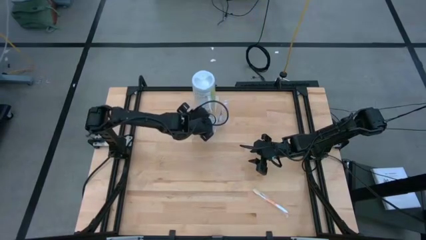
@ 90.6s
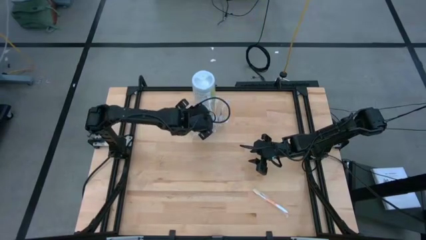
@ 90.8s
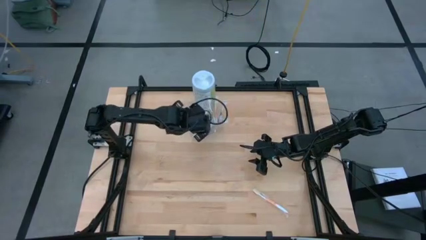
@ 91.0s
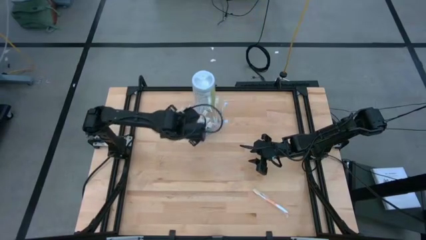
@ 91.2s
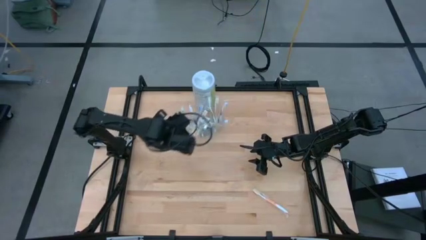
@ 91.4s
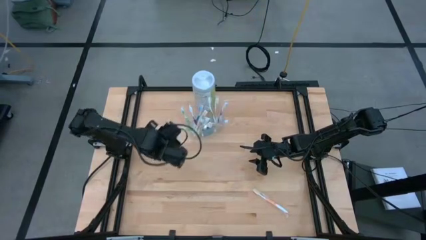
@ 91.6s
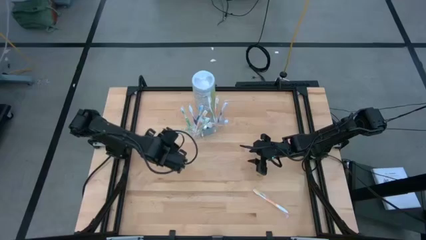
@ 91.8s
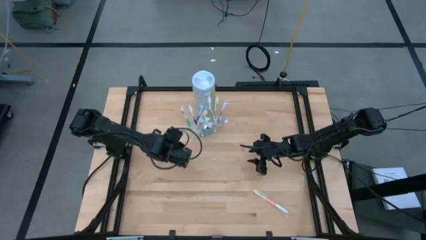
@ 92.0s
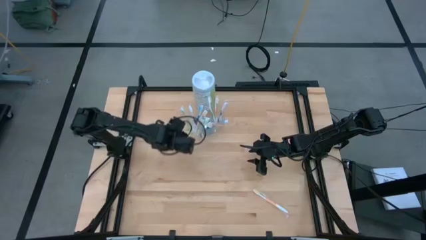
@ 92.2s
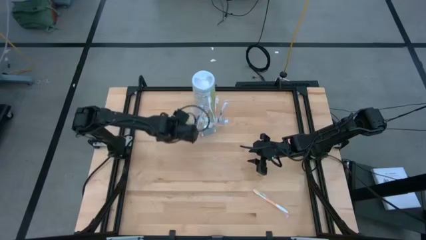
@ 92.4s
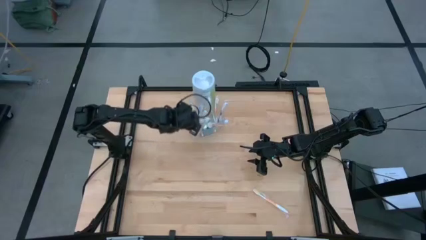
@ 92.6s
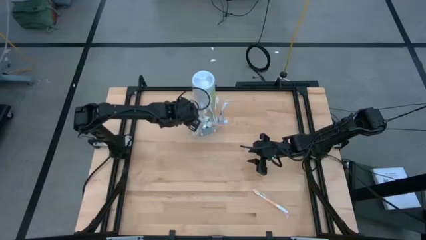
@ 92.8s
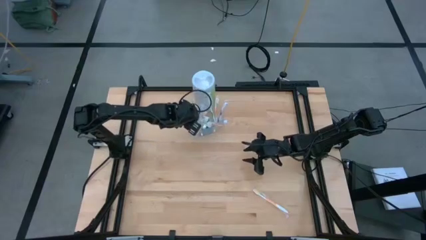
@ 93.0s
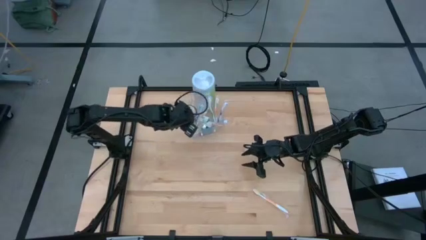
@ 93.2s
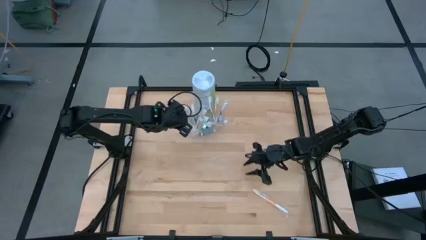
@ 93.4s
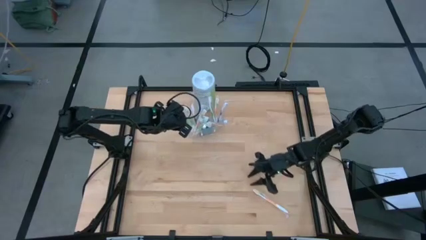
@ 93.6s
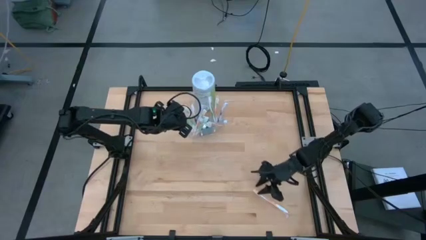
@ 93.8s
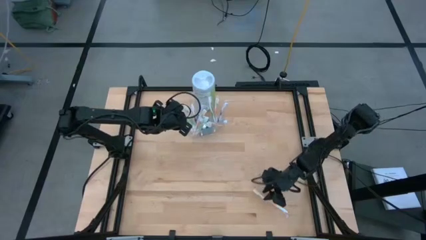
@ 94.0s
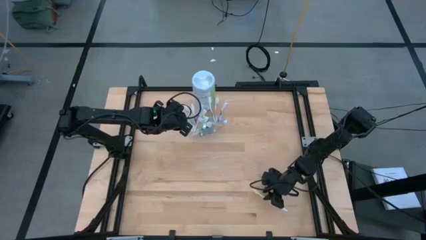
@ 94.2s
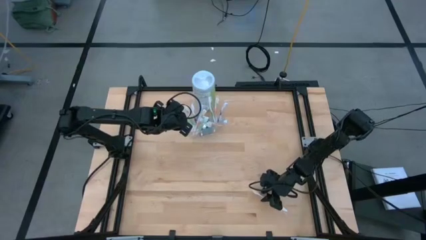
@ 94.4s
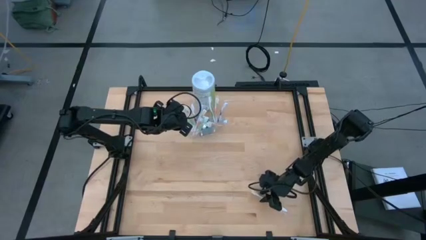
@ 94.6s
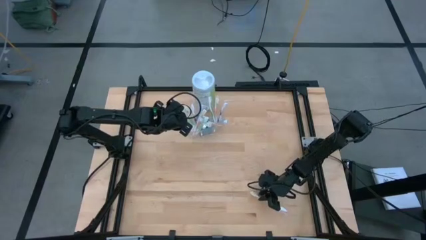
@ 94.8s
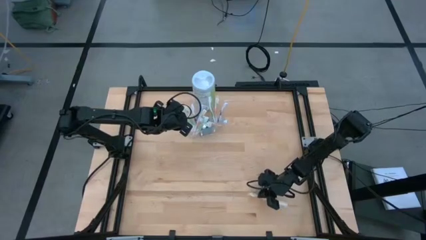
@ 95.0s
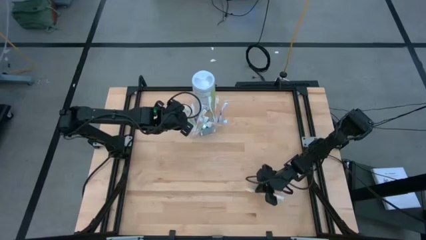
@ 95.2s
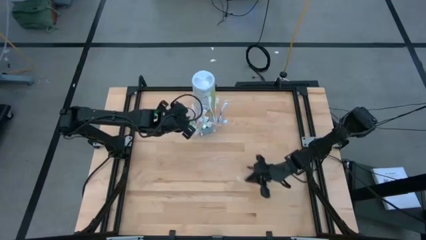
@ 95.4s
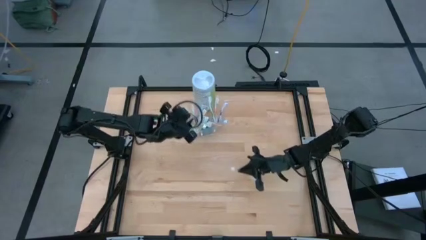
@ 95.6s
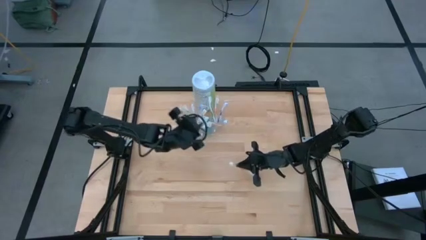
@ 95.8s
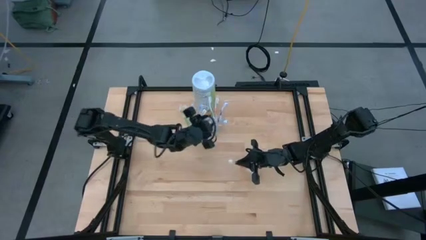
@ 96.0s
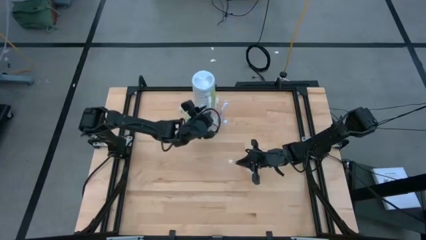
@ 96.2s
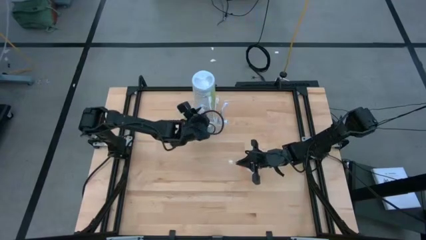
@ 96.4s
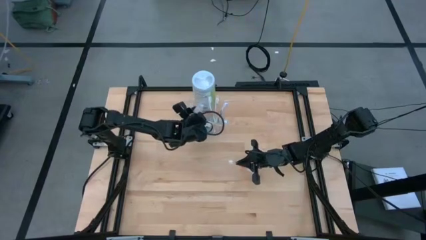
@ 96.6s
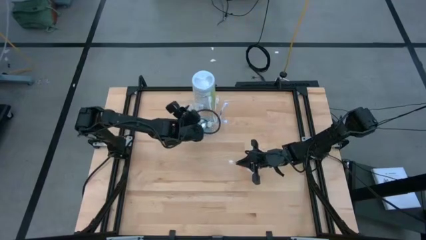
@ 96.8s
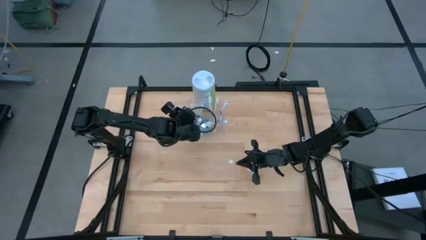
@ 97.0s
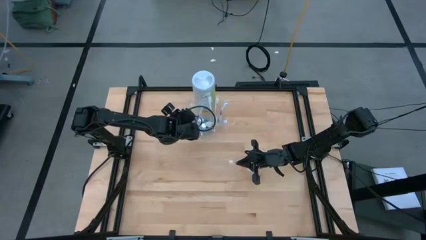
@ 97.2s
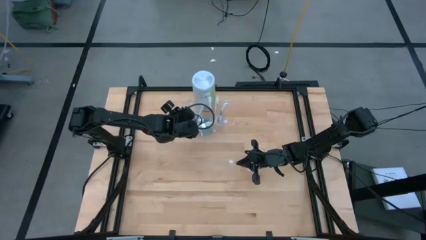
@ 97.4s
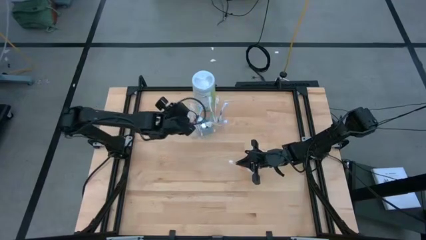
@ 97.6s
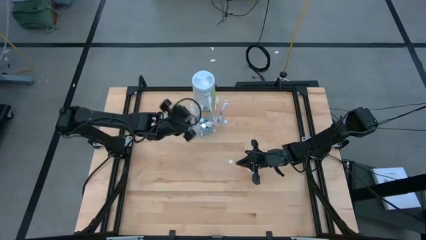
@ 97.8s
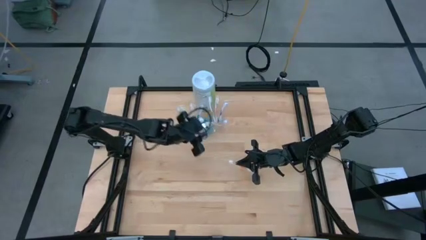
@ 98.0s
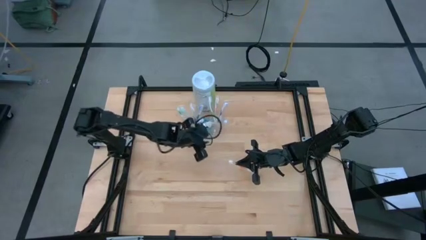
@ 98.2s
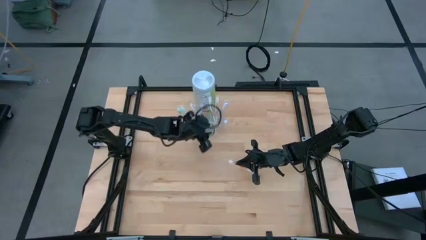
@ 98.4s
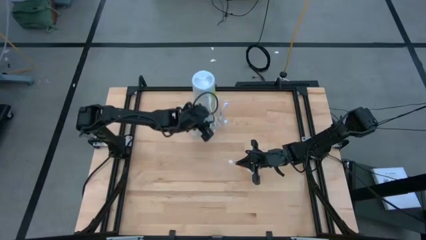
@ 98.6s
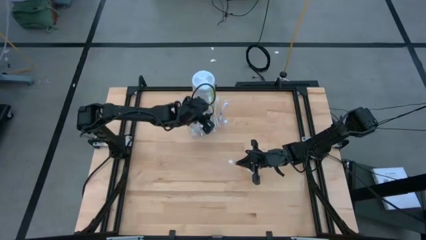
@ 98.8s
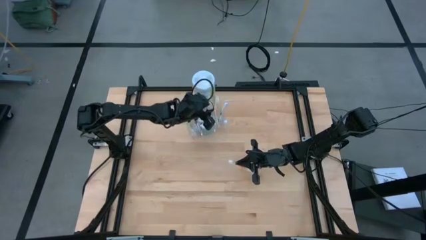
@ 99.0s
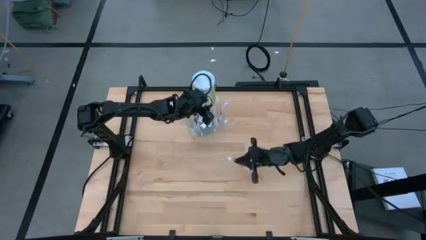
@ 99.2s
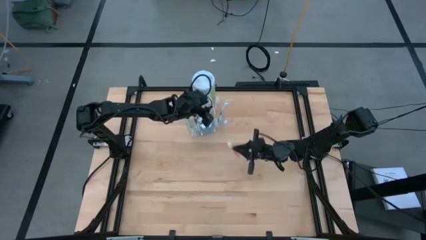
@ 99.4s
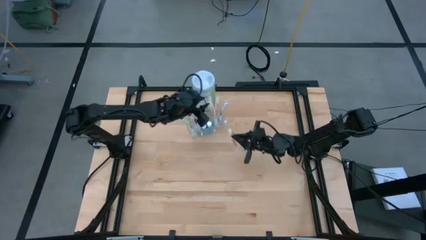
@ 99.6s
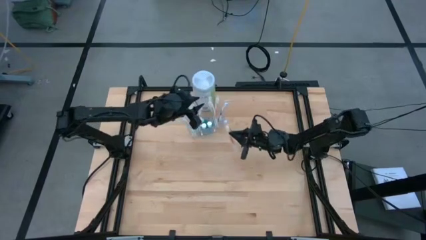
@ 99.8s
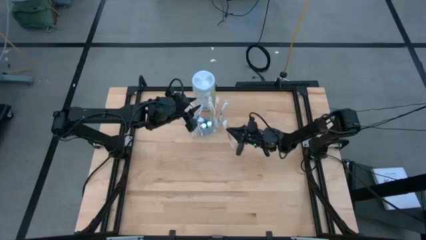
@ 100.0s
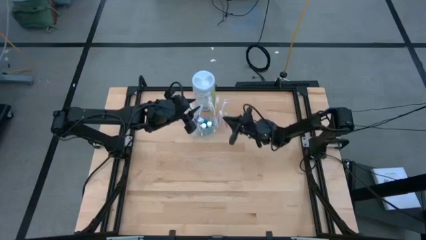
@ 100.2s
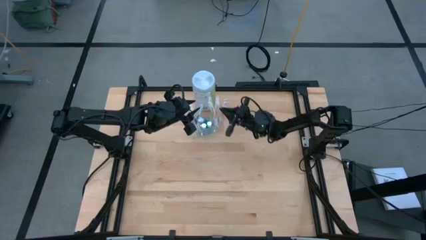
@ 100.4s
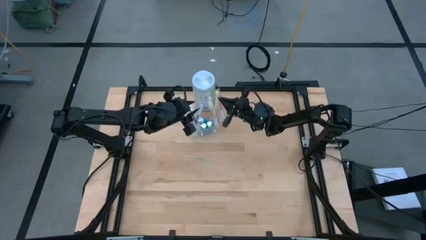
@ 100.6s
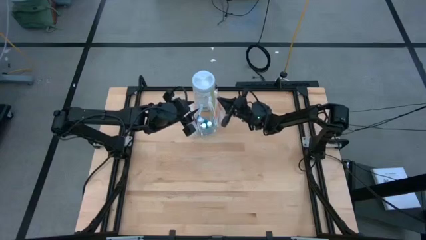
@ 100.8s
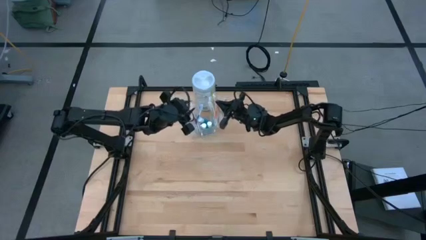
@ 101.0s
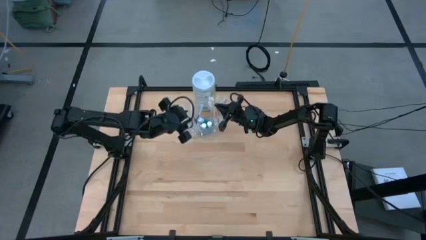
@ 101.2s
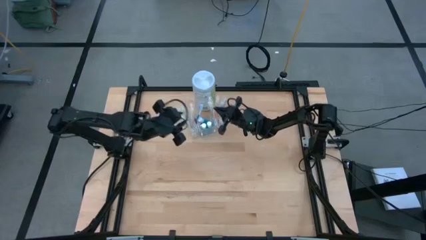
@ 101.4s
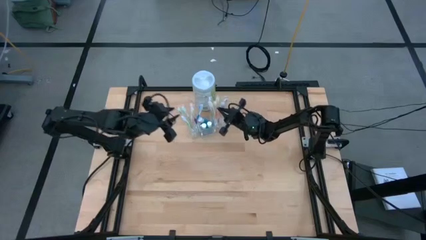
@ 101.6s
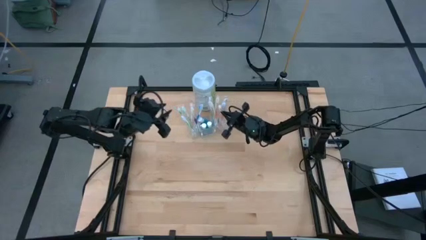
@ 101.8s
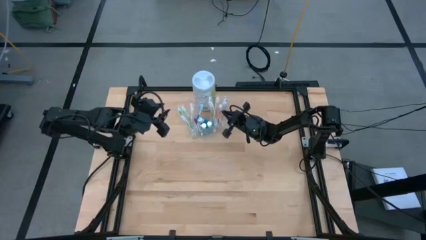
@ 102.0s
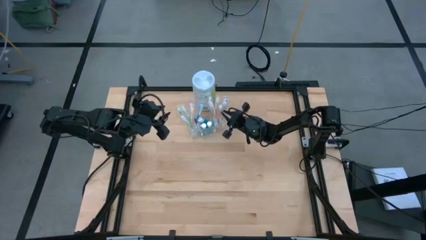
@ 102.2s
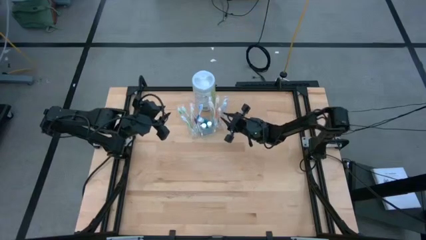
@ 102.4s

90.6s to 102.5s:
Task: Pick & Place toothbrushing station
Put the orange toothbrush into the transparent organizer

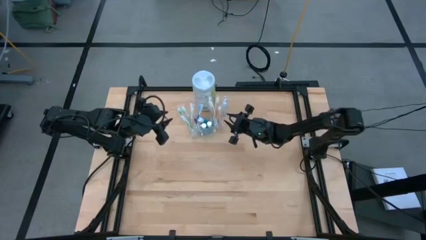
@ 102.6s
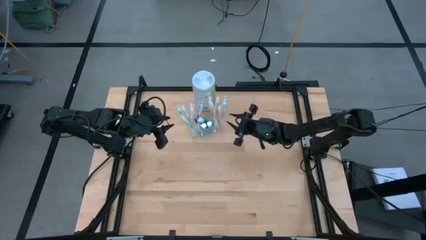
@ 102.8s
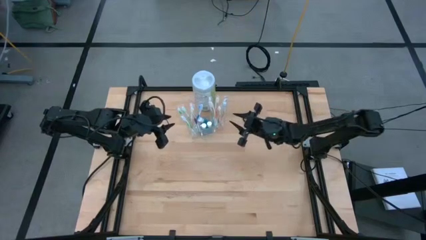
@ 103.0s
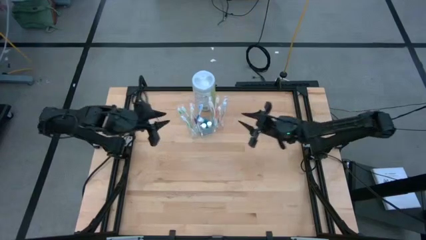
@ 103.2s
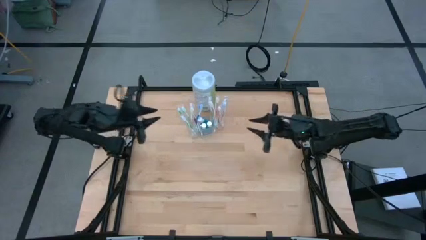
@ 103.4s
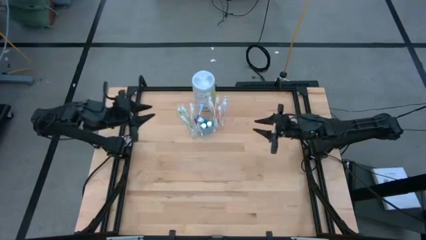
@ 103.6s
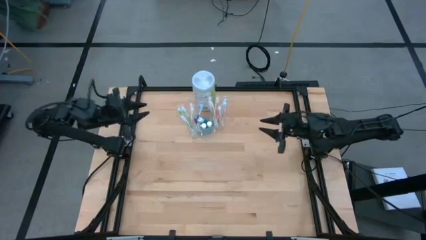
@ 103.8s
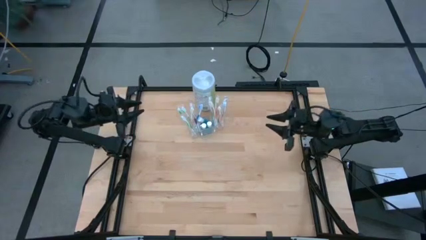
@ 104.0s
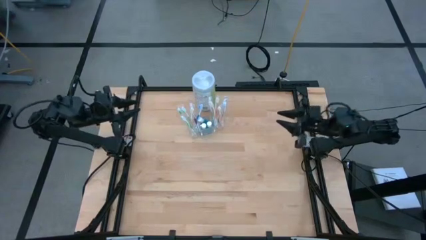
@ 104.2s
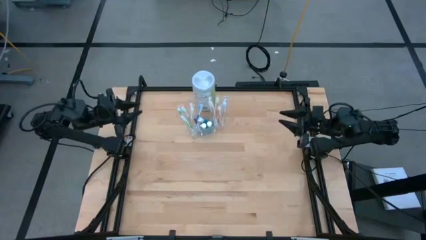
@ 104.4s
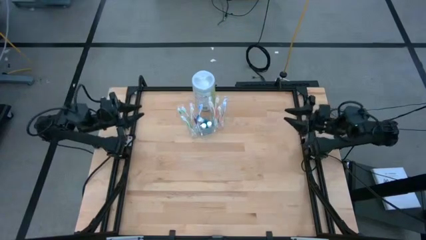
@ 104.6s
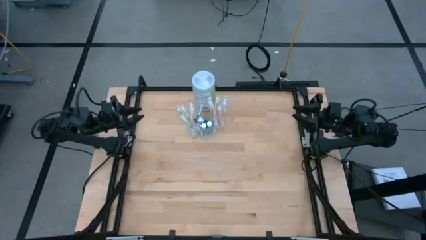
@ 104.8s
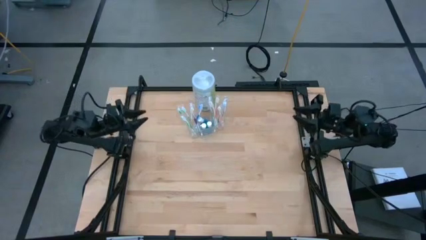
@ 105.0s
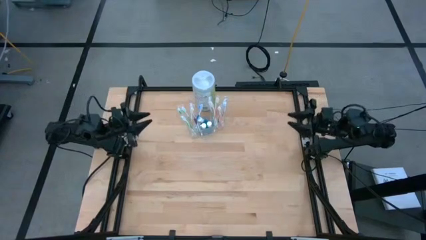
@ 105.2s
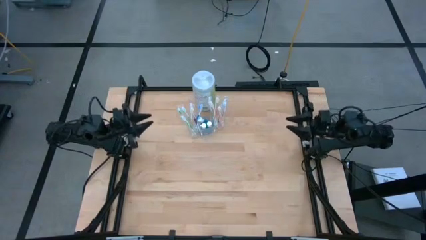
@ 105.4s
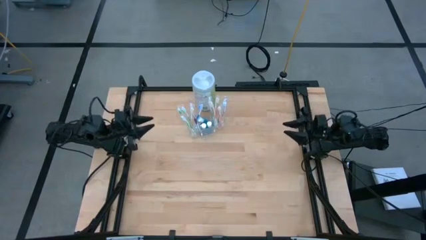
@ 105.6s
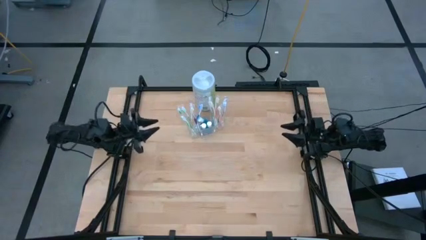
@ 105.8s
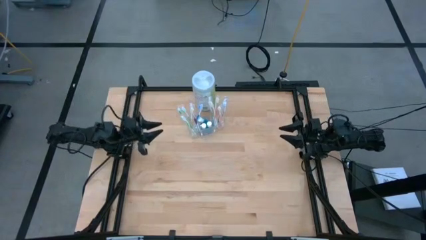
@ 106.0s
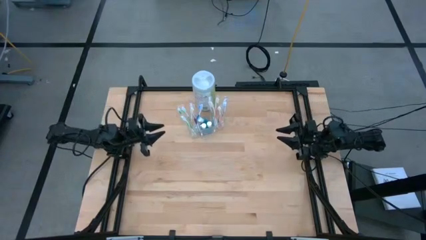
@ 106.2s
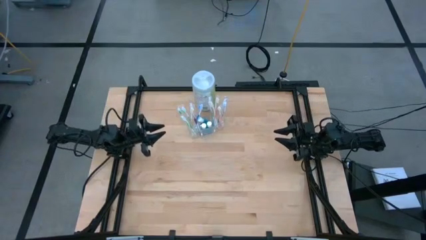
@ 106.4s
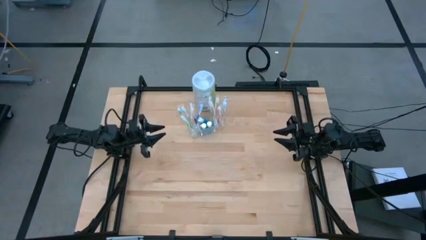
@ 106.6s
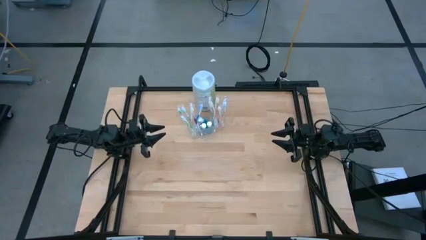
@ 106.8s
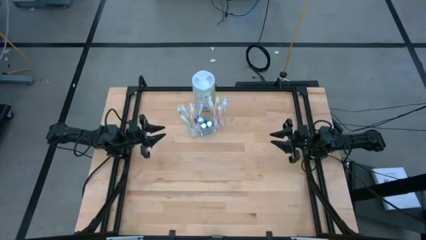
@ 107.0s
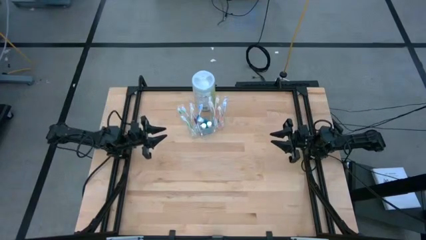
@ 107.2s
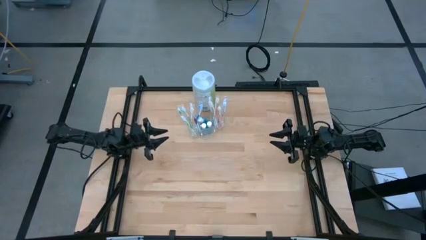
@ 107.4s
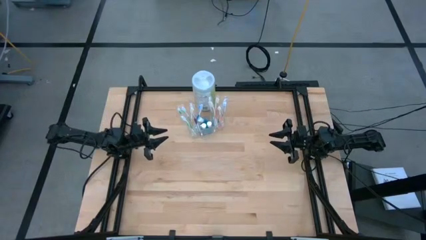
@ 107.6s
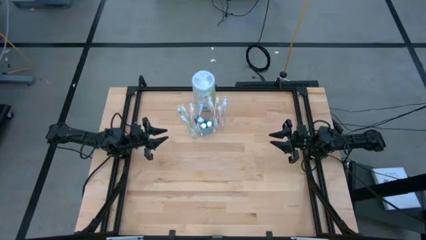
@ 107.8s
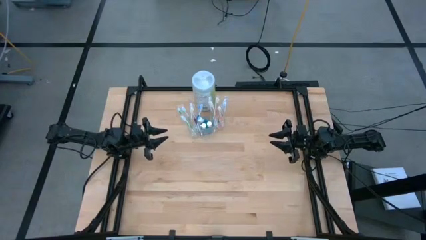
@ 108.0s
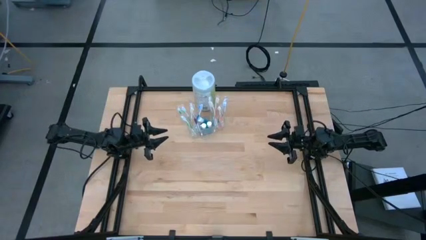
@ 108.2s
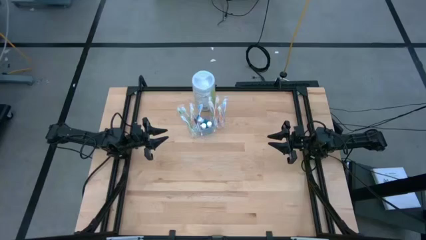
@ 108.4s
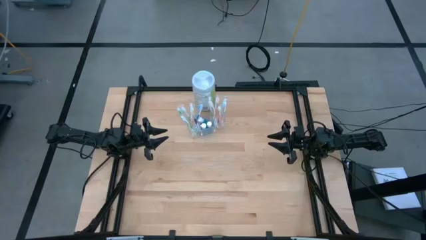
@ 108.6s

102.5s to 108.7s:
Return to Home Position
